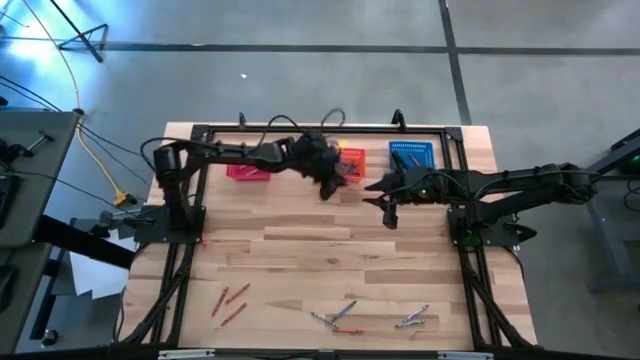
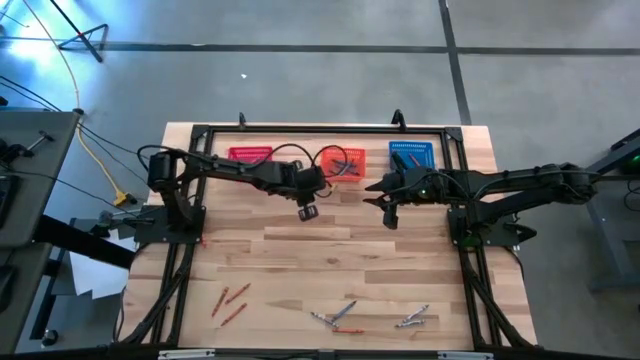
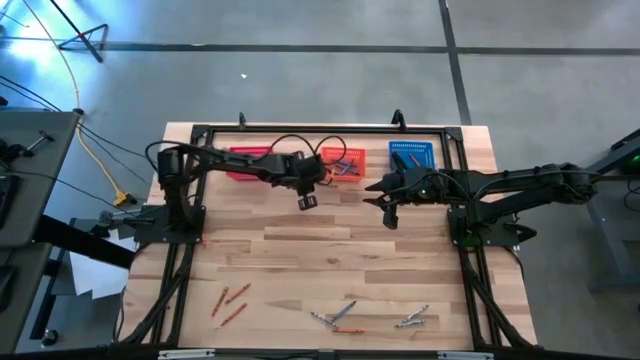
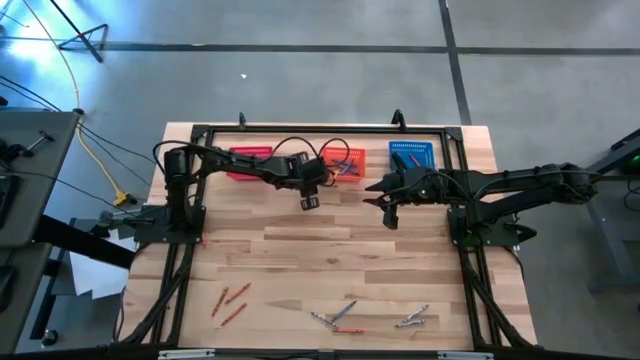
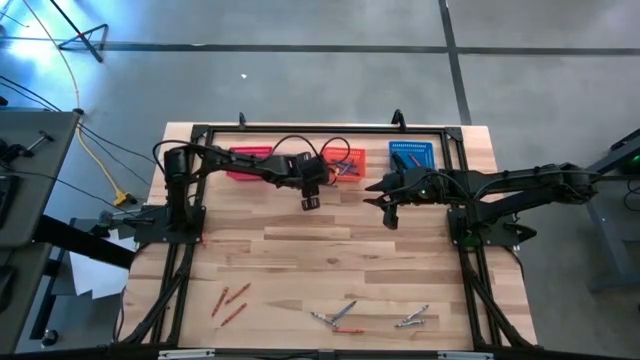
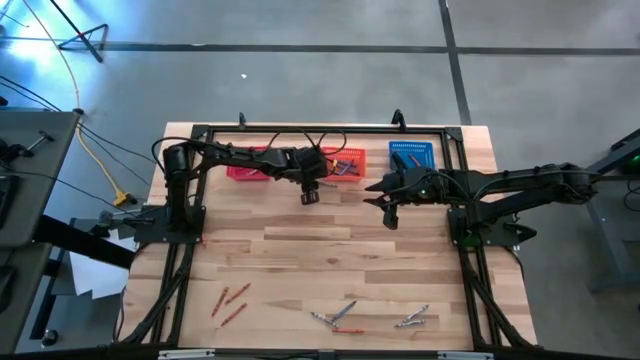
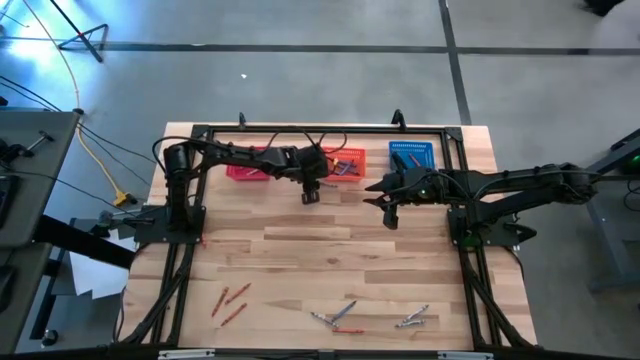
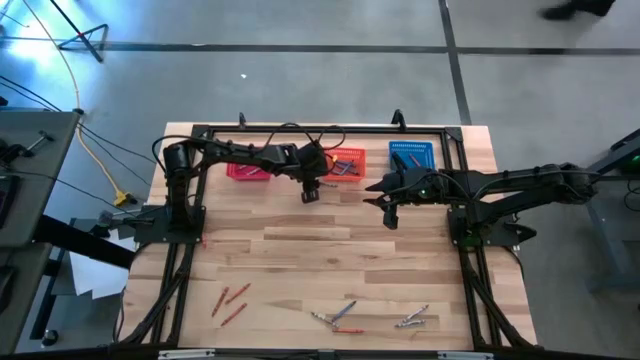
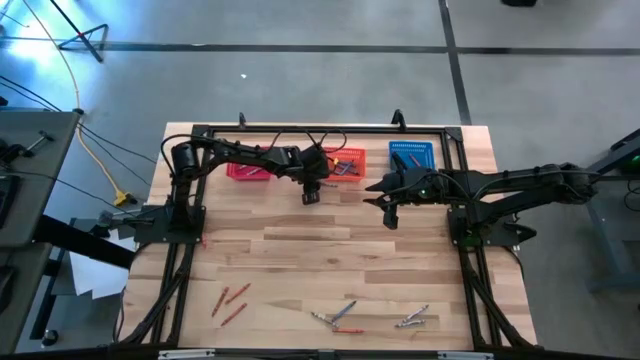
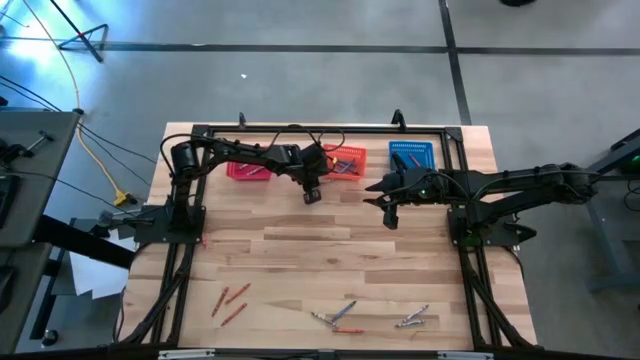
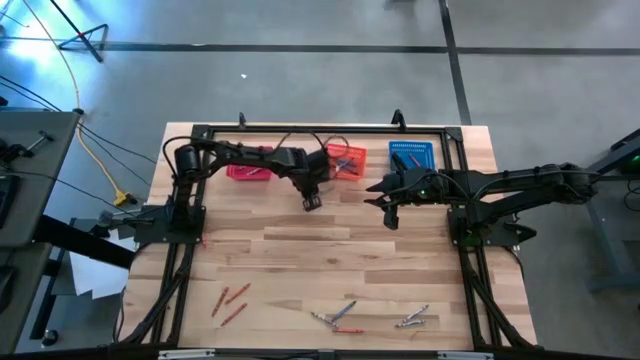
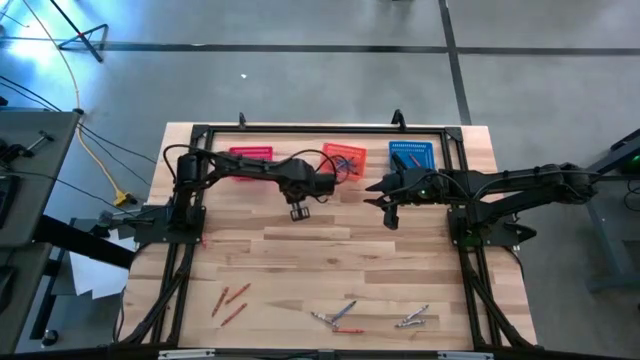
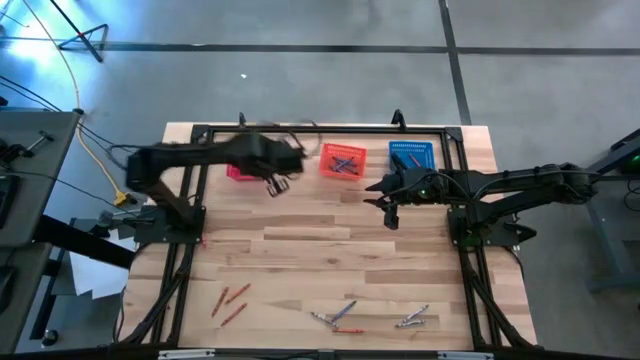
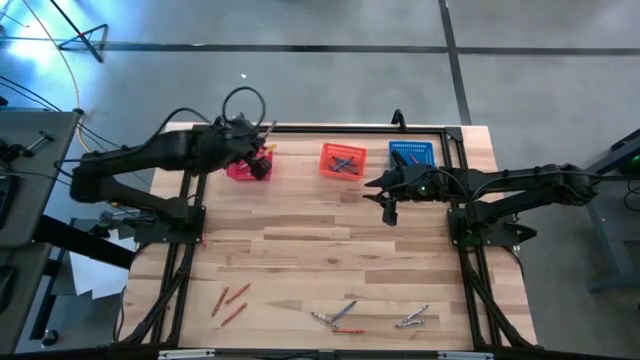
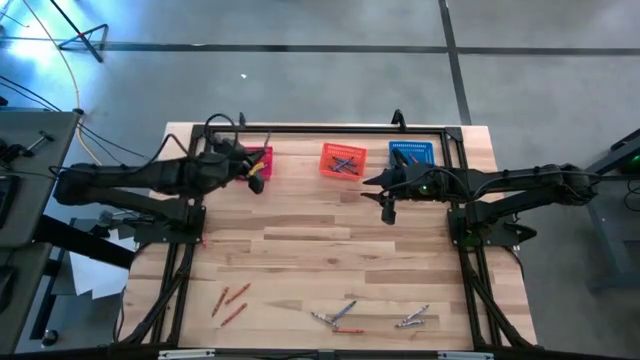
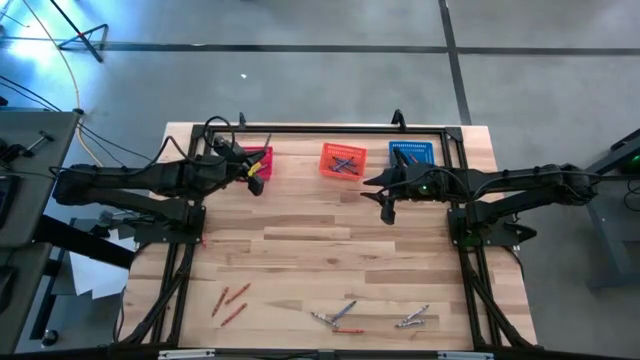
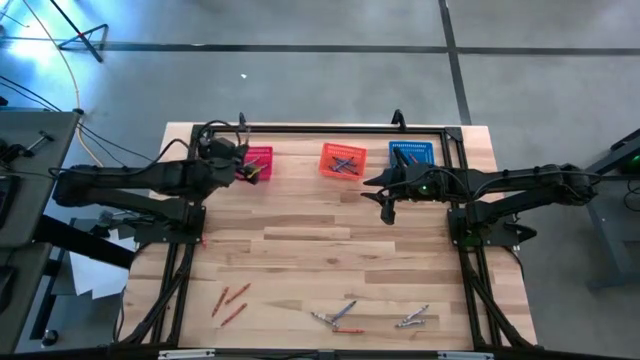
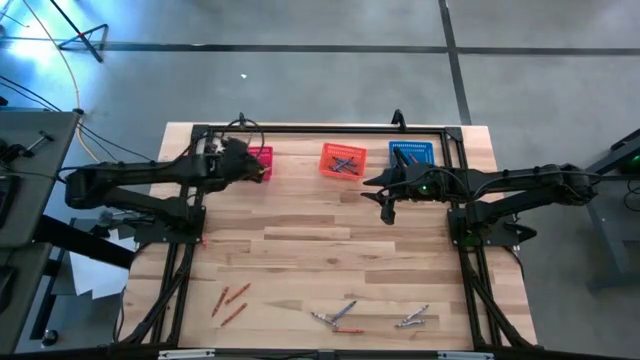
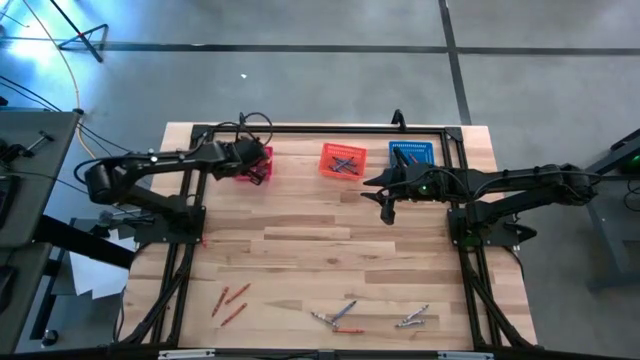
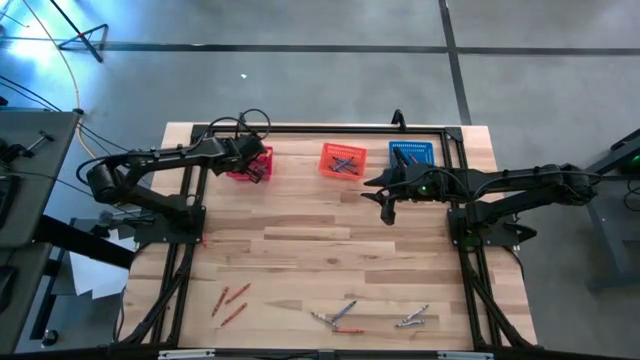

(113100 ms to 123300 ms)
Task: Sort crayons
Put the gray crayon into the red bin

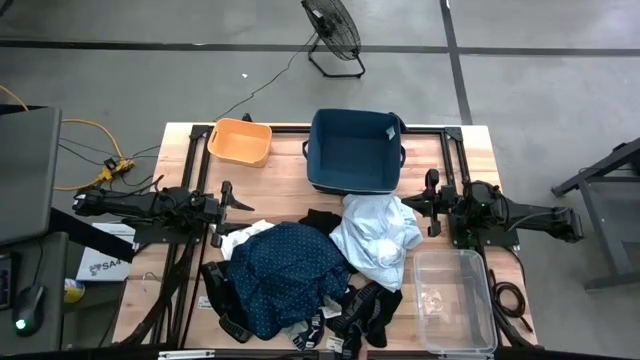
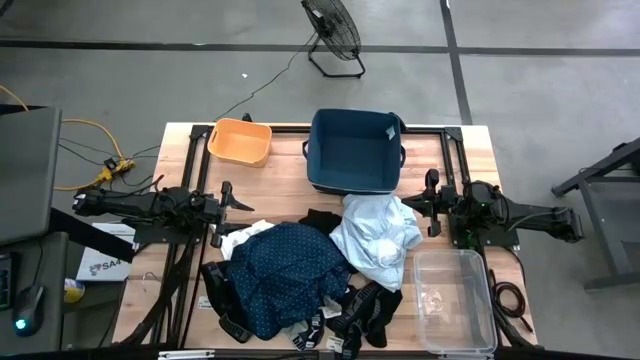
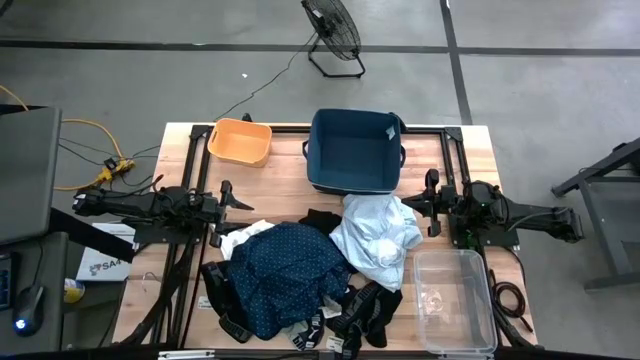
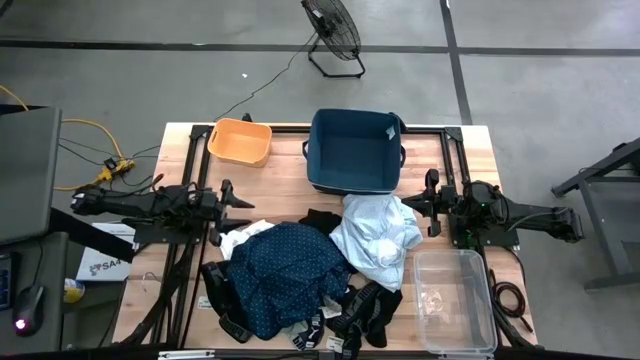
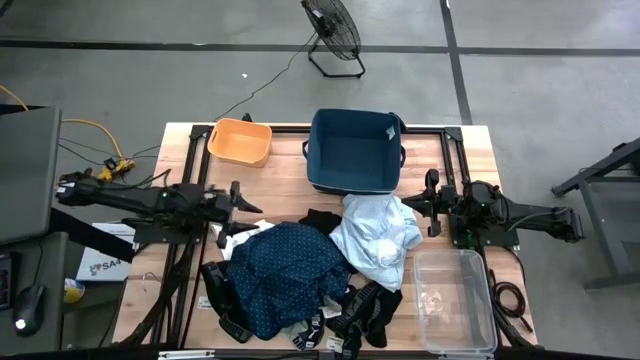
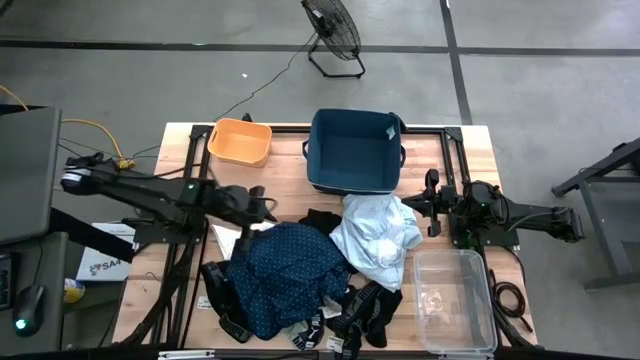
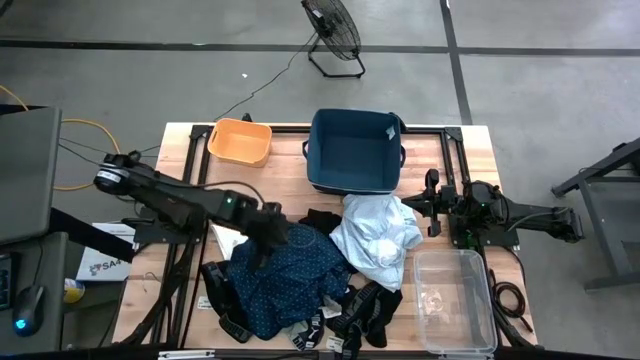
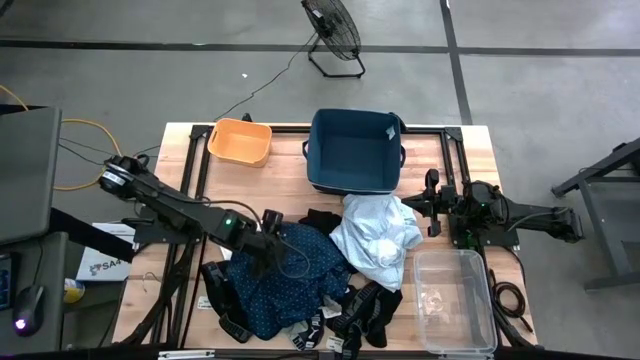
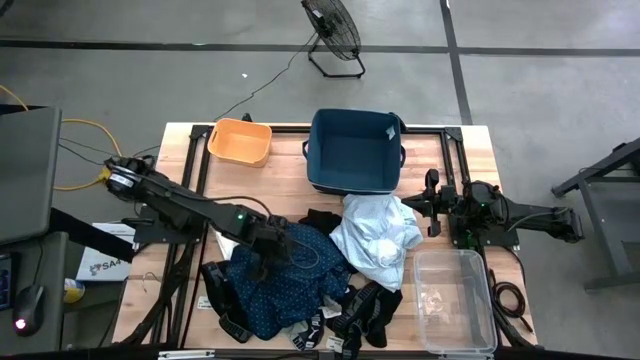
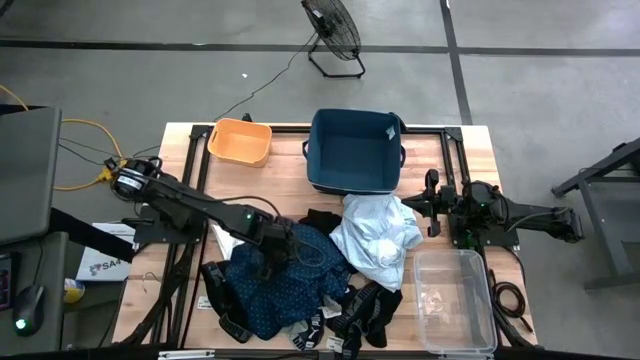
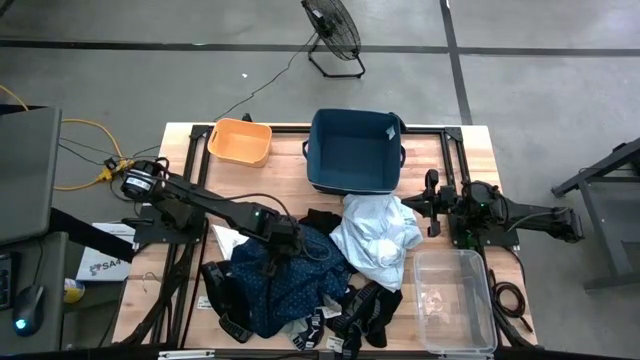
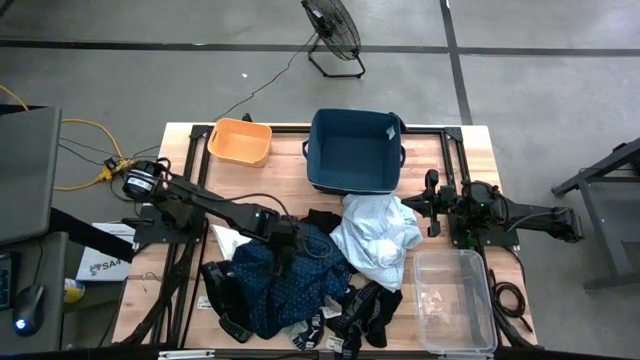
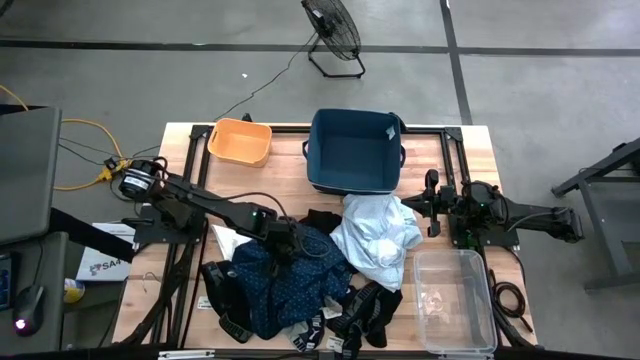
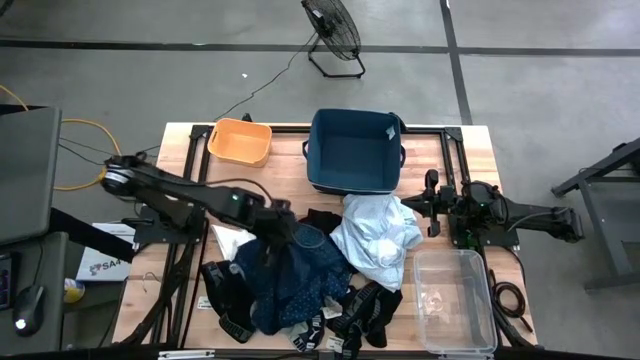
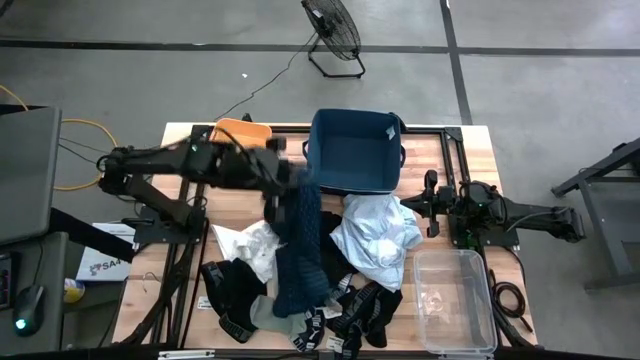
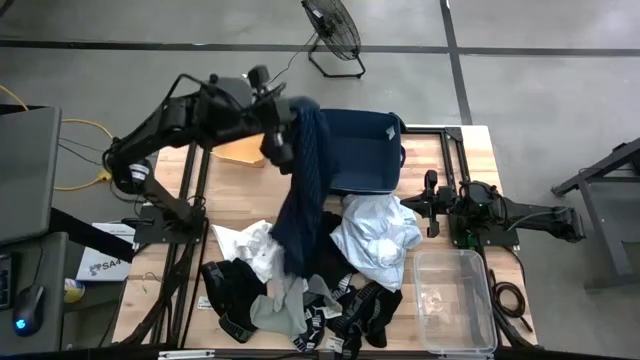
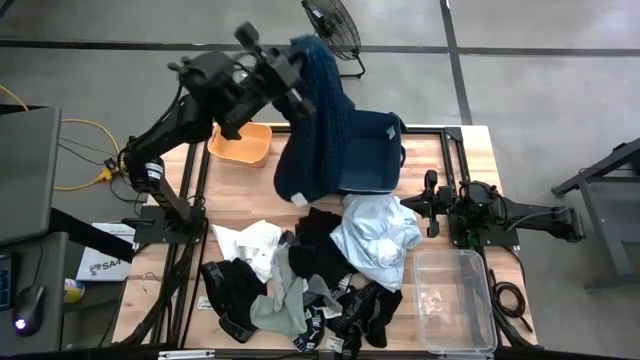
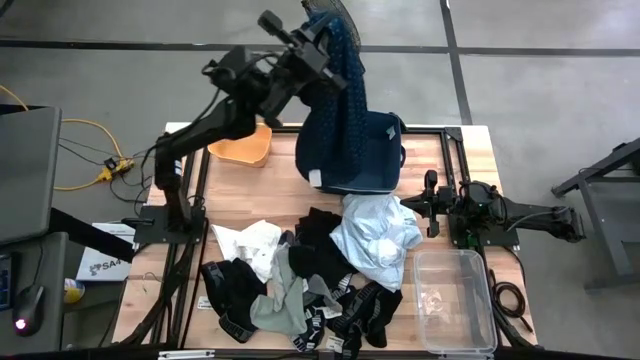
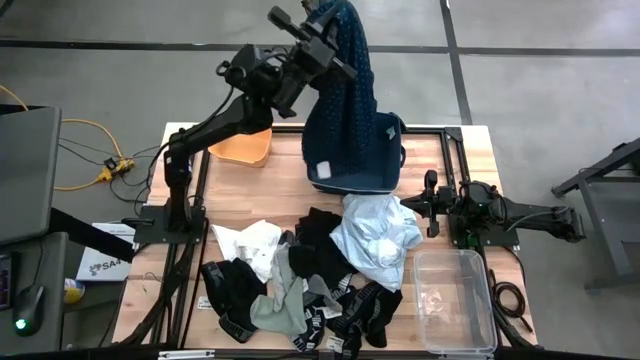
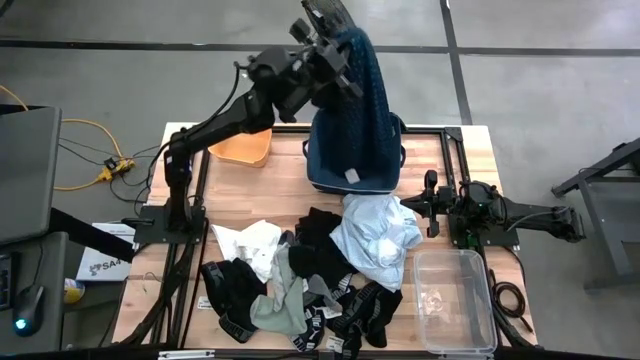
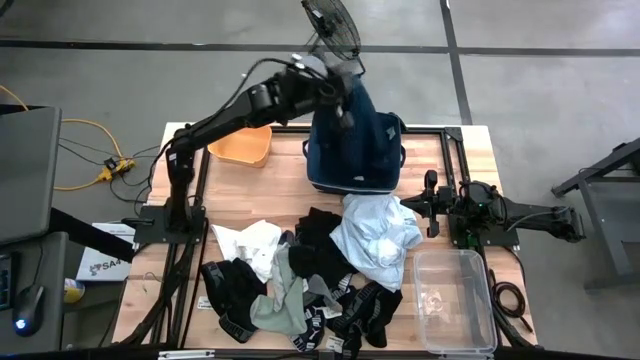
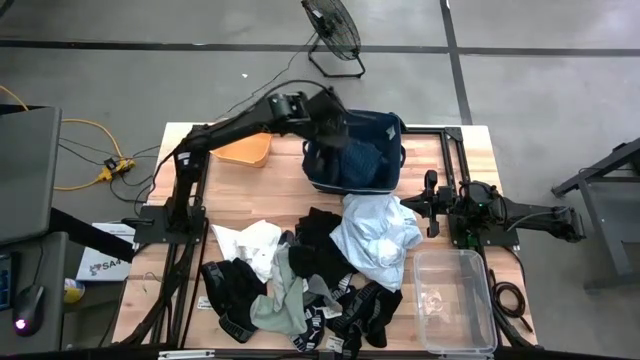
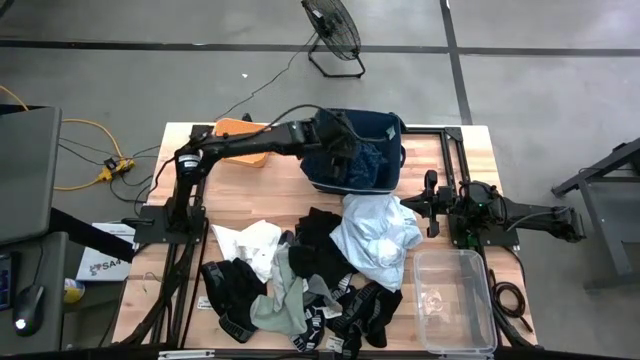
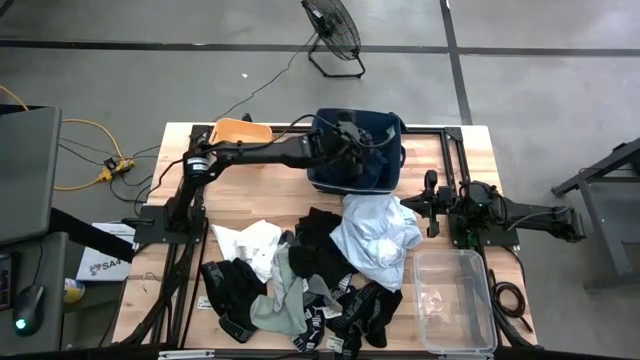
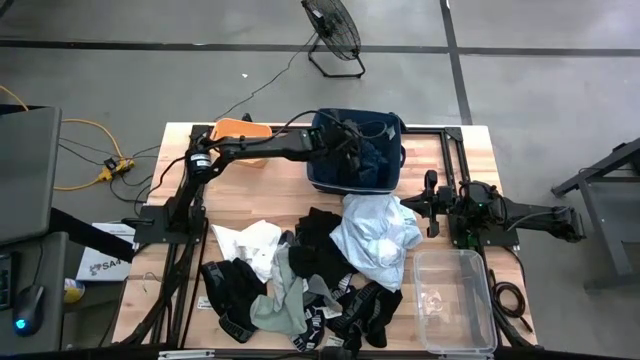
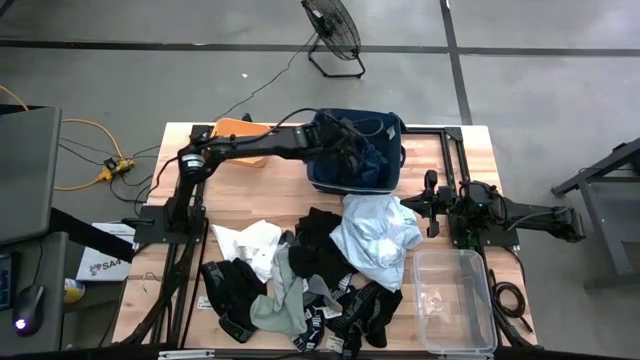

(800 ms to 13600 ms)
Task: Pick & Place Cloths
Put the blue shirt into the blue laundry bin
